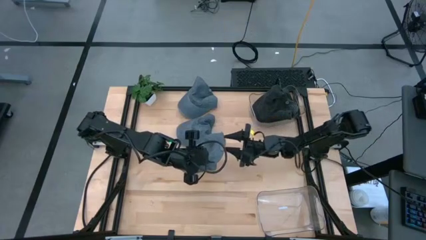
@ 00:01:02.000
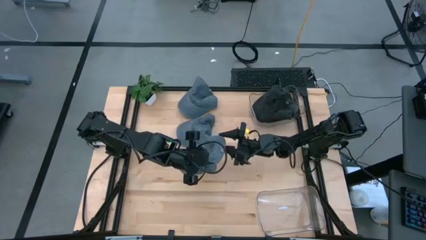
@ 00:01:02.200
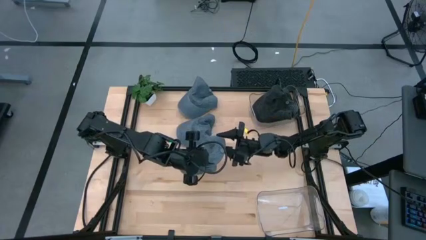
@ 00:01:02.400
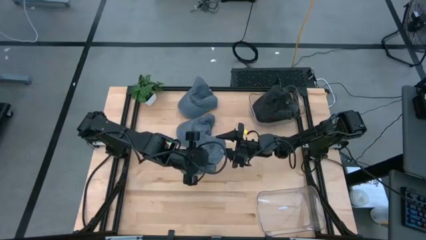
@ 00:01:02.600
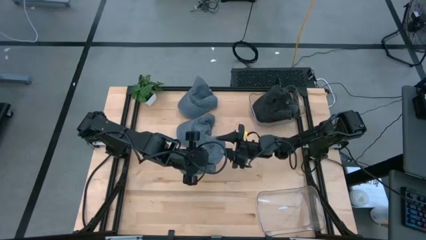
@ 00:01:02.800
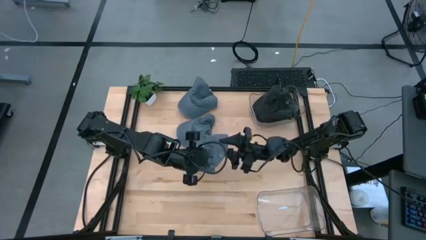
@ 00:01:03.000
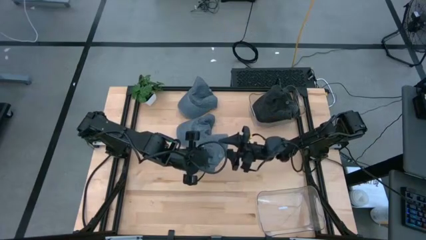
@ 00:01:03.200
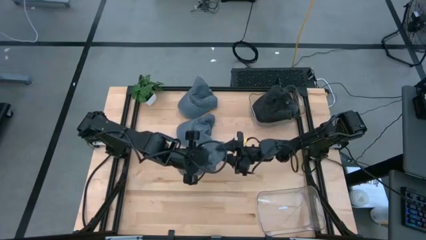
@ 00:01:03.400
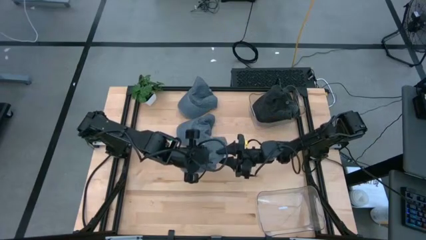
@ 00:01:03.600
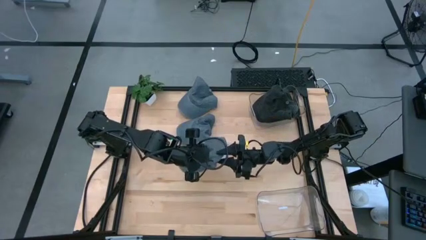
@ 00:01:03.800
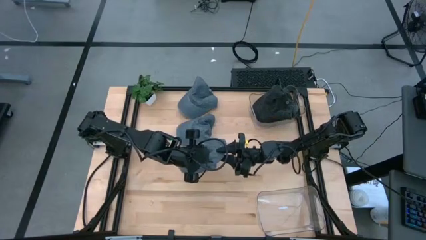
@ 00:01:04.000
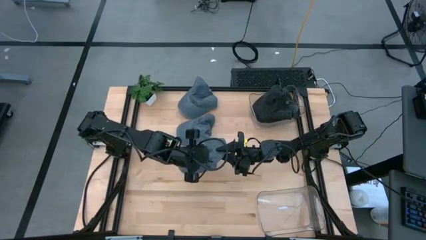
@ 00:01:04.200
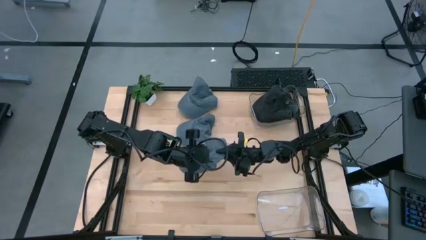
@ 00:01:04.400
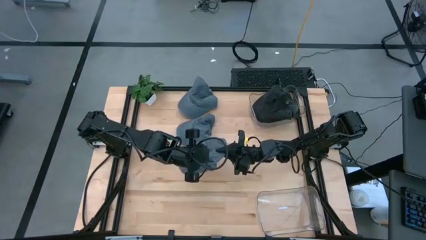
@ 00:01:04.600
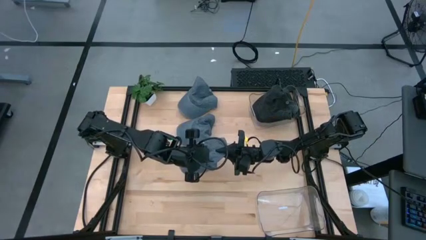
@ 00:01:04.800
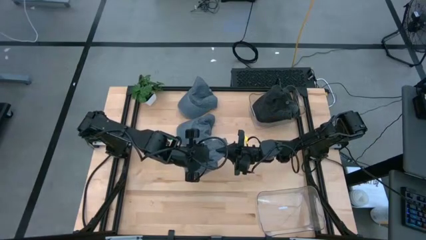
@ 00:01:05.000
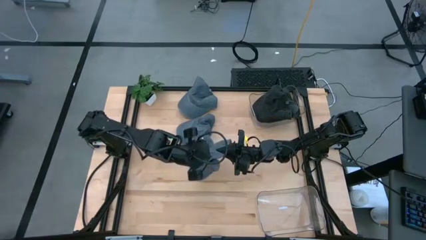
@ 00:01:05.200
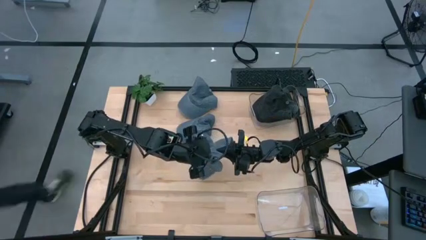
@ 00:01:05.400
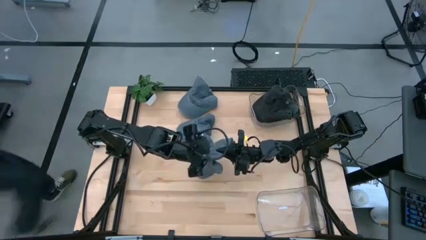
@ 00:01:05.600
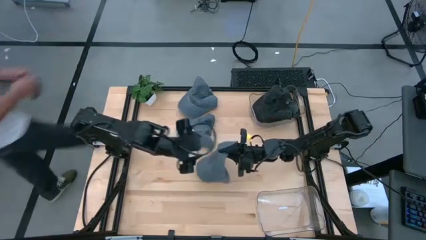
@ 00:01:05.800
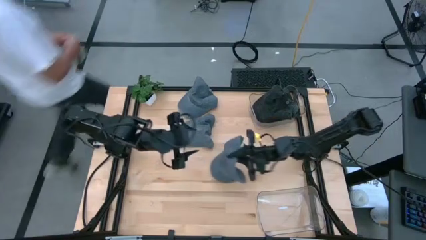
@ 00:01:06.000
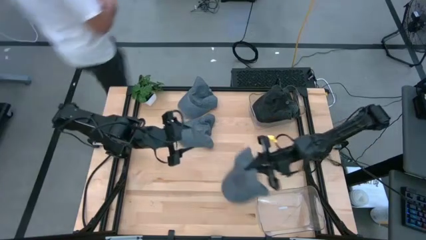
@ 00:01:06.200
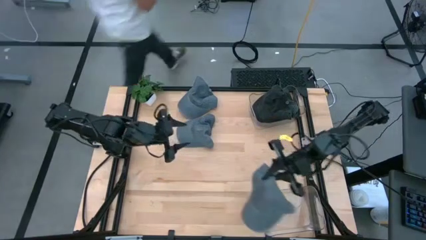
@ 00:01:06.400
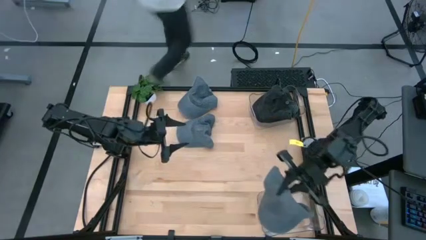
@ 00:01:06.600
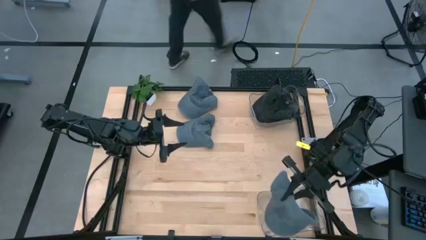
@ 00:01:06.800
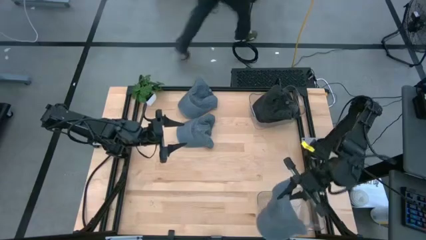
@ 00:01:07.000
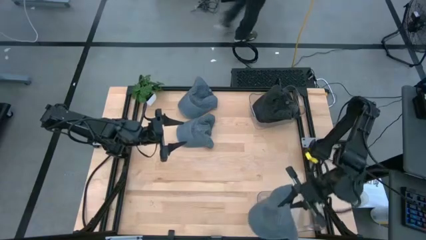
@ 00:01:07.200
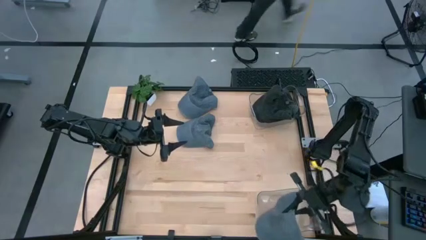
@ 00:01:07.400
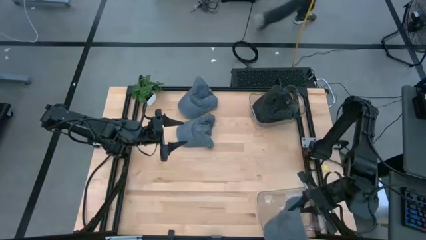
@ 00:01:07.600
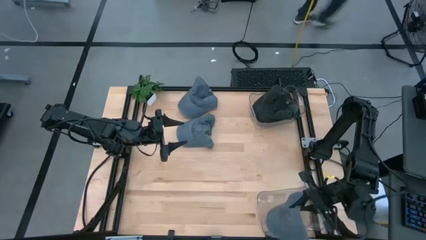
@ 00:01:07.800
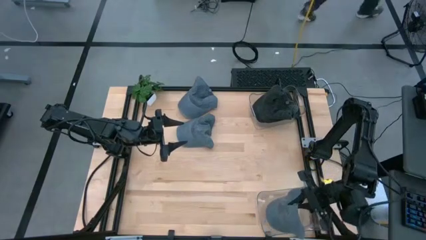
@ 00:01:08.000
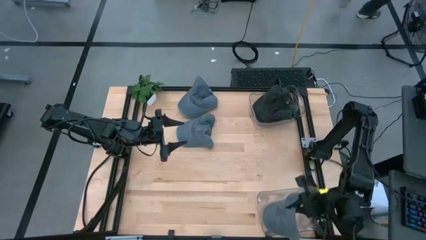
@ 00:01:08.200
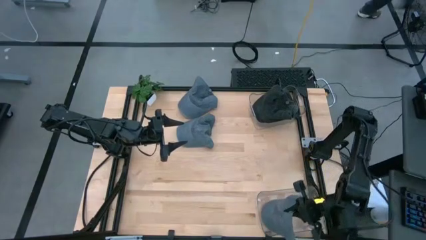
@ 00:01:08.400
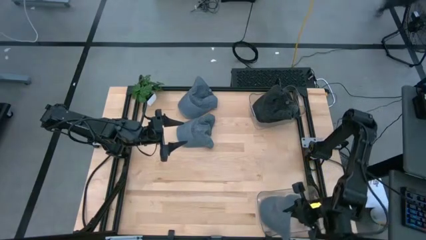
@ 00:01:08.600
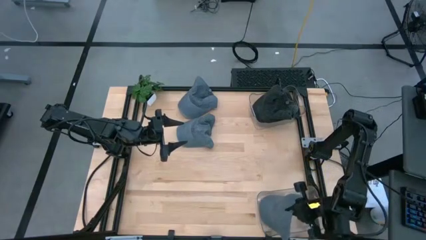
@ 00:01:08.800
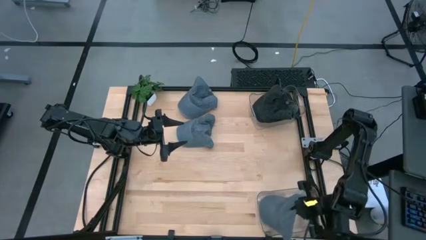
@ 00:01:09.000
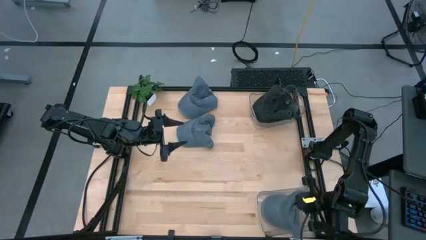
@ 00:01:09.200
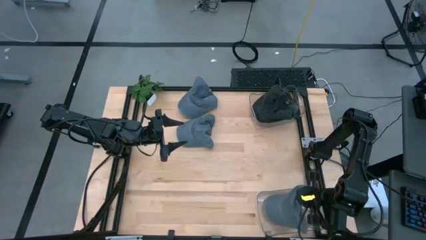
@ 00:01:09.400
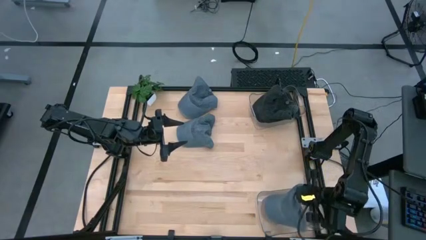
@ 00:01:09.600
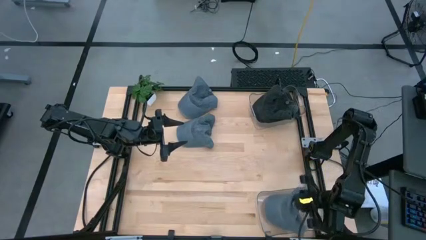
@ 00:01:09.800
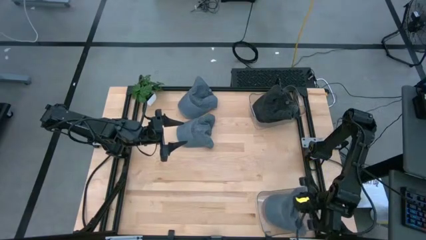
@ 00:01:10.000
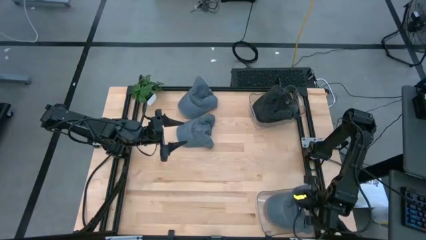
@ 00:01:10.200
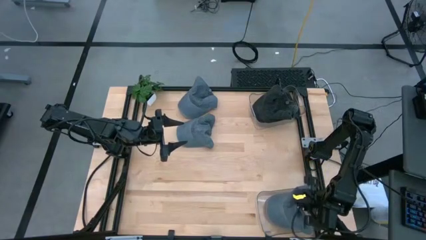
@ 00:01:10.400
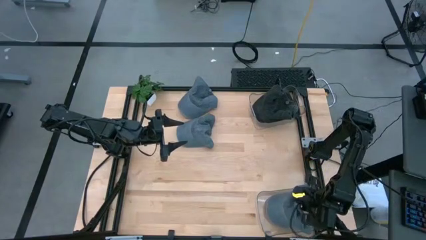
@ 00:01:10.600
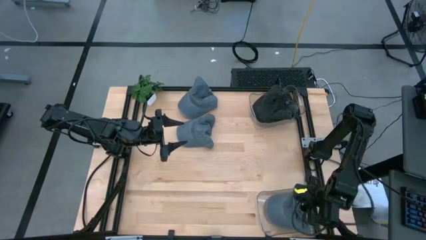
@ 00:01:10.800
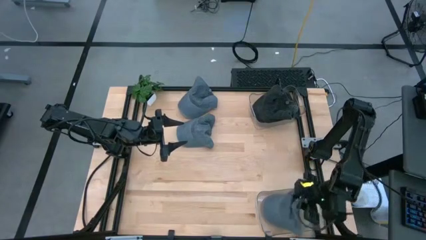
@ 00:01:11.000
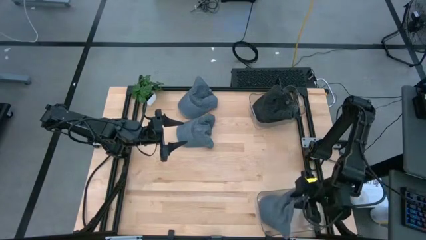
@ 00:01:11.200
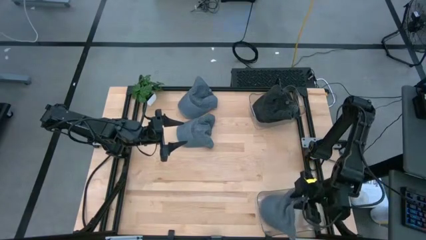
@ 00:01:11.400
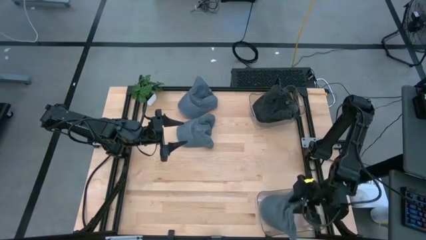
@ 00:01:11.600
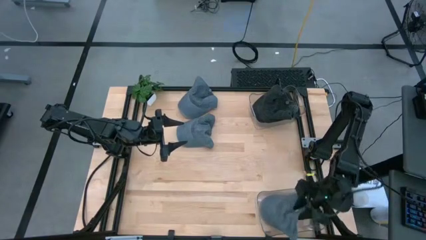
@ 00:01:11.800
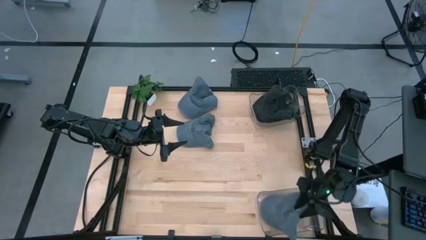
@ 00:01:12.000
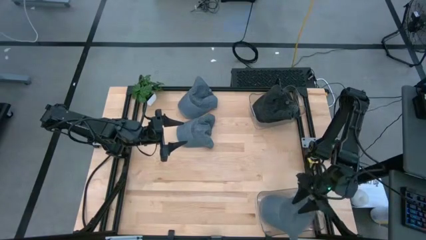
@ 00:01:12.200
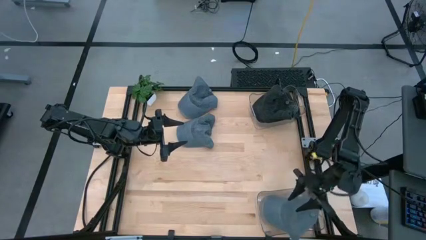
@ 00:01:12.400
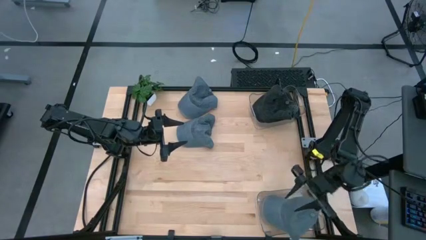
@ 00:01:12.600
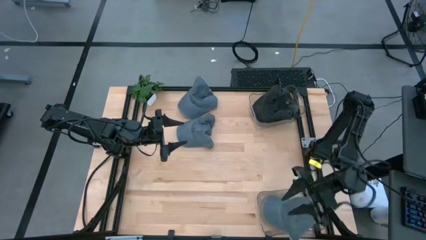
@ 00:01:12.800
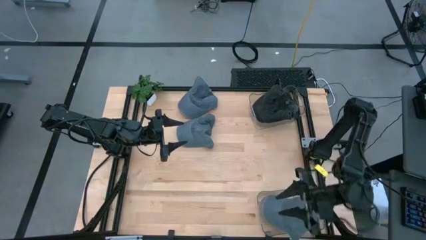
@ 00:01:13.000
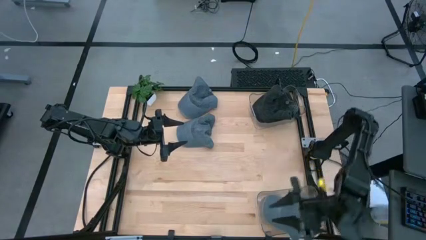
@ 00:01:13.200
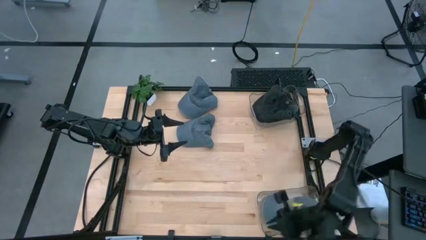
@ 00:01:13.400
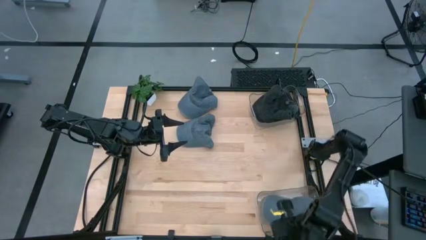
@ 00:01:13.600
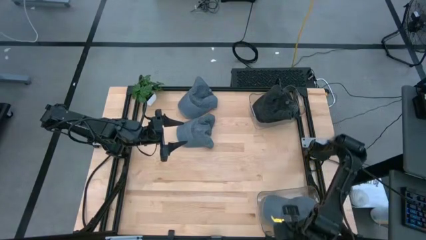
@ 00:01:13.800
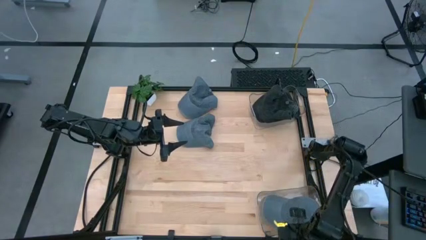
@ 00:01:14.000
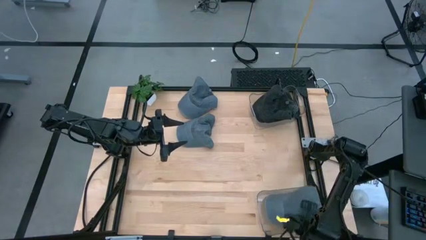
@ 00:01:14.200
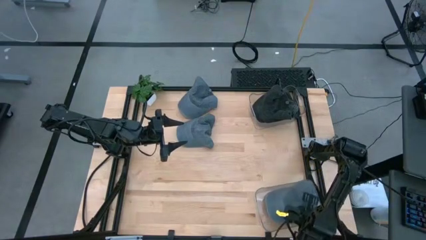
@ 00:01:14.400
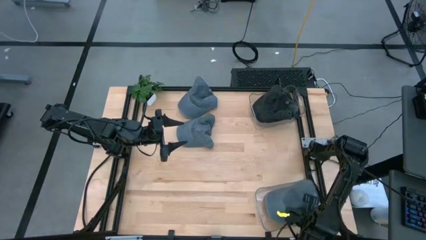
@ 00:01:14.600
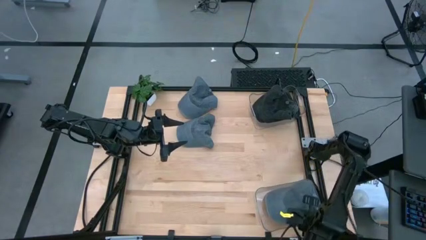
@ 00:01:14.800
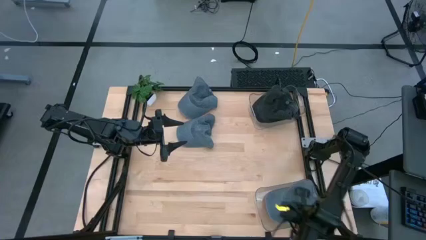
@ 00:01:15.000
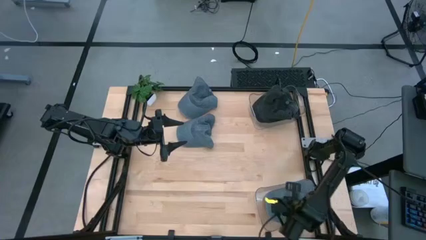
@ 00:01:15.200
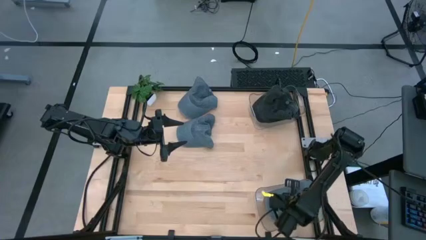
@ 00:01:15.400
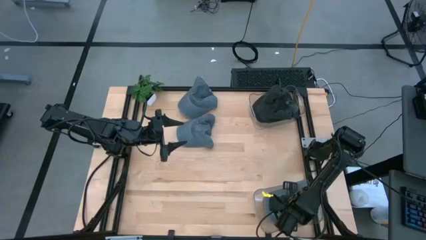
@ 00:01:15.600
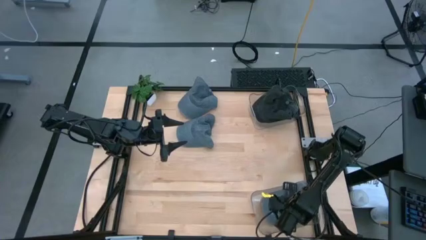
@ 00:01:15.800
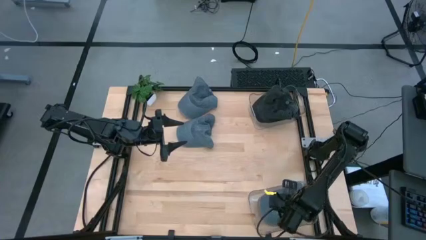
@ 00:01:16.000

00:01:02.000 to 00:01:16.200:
Task: Pick & Place hat
Put the bottom gray cap into the bottom transparent bin

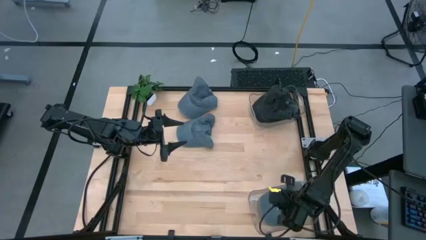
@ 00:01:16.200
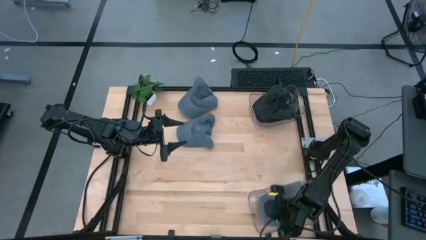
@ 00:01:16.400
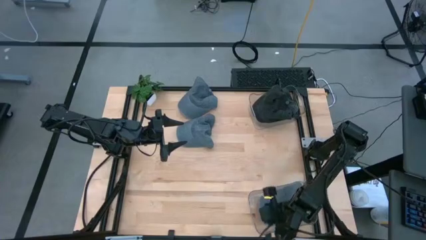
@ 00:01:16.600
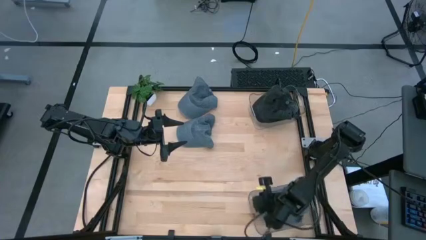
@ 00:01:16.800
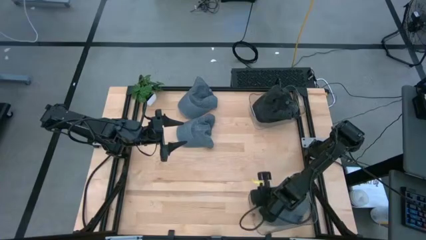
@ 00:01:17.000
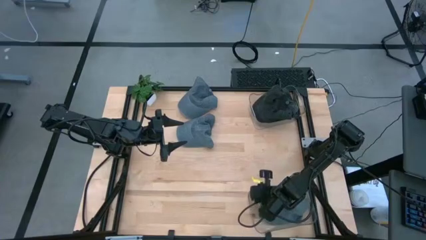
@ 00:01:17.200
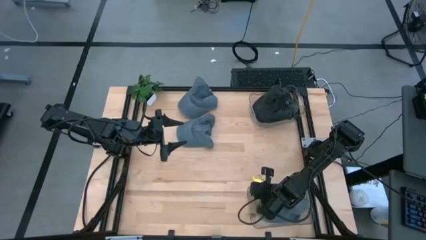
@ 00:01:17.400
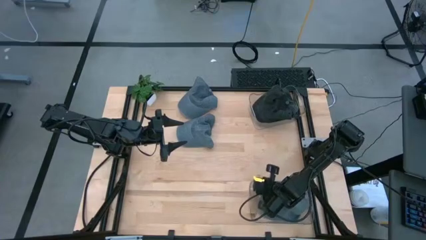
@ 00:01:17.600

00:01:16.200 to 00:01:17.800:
Adjust the bottom transparent bin
